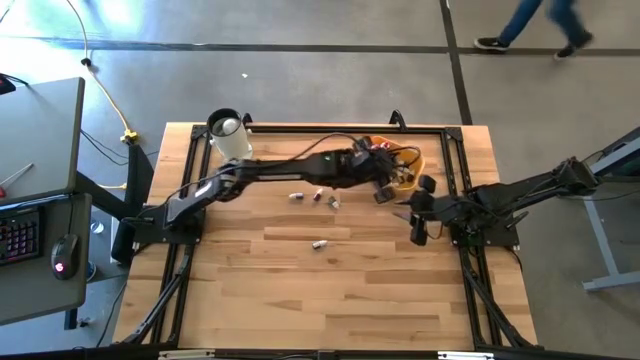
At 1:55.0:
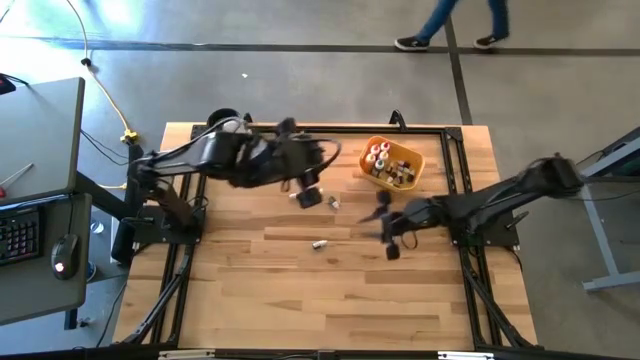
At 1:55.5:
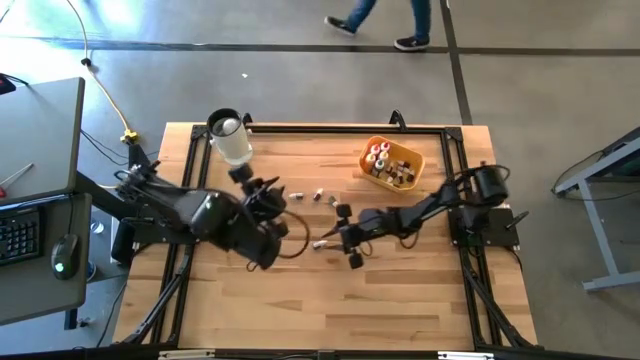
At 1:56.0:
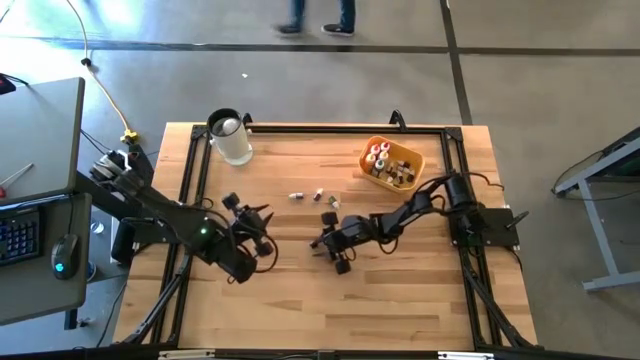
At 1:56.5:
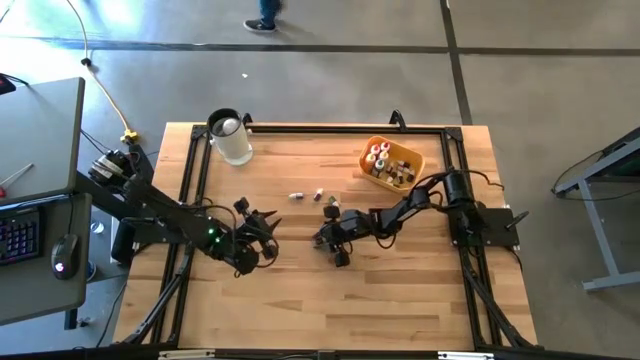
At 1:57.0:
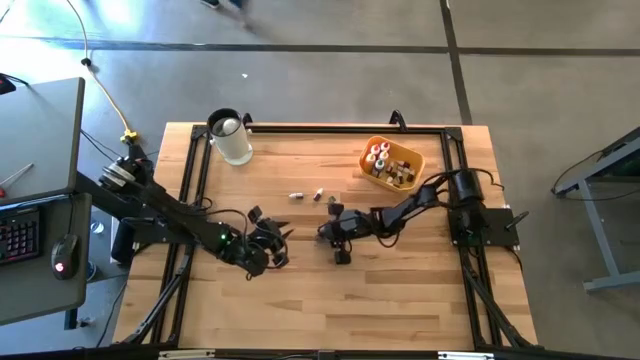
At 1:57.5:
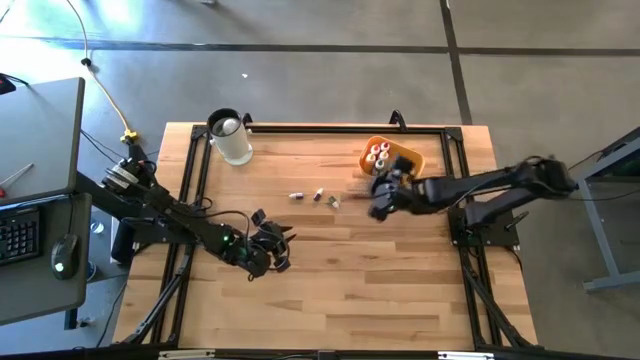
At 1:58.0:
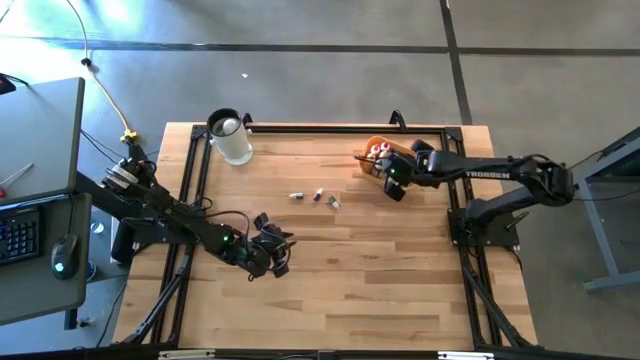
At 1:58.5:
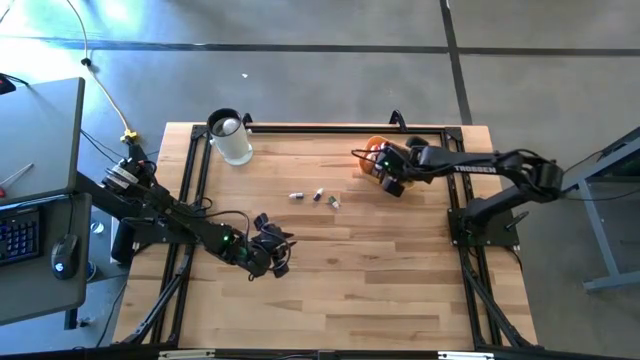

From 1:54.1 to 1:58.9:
Task: Pick & Place food coloring
Put the bottom small green food coloring bottle into the yellow bin

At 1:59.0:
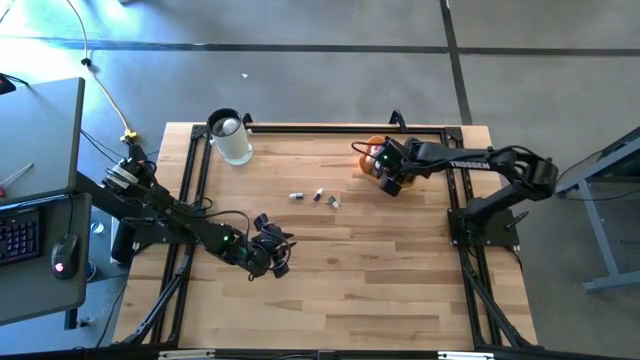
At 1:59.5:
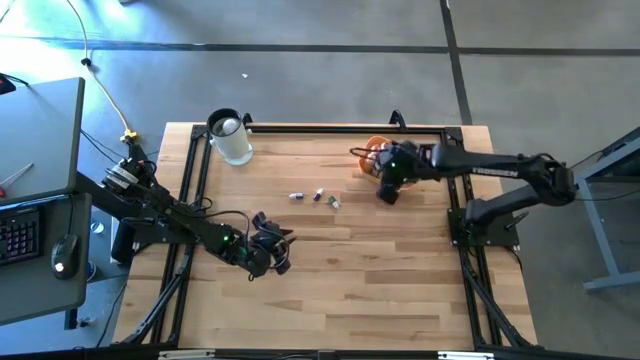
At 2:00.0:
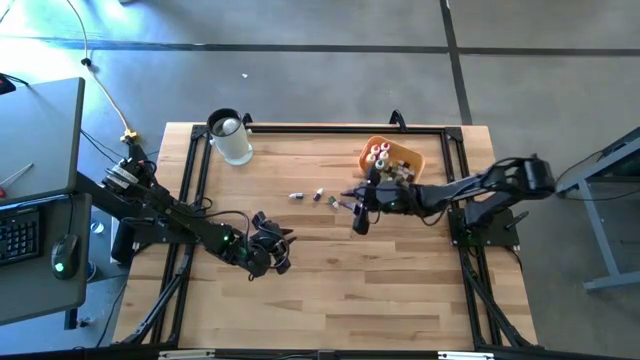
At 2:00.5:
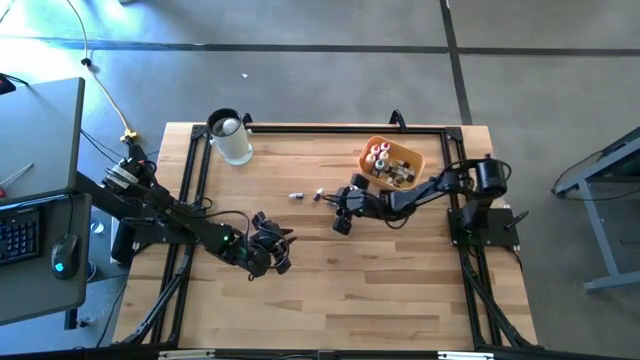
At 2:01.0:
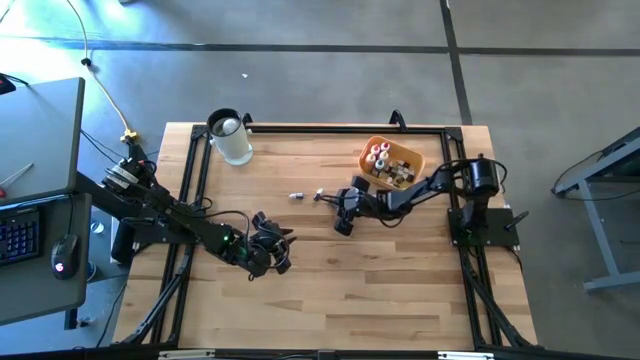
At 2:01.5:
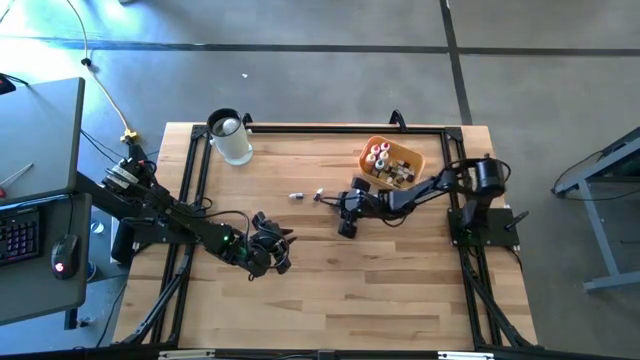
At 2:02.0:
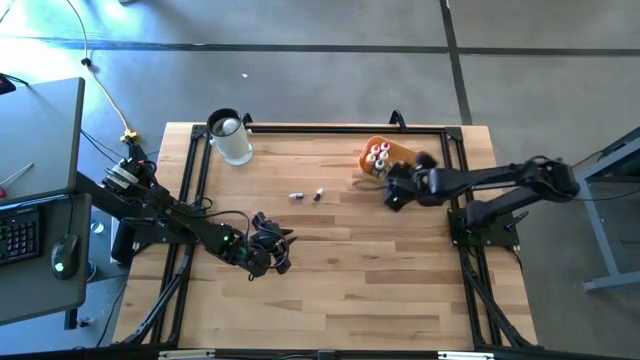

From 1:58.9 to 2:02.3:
Put the small green food coloring bottle into the yellow bin

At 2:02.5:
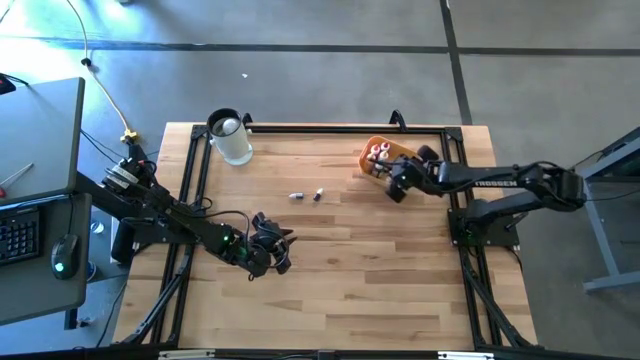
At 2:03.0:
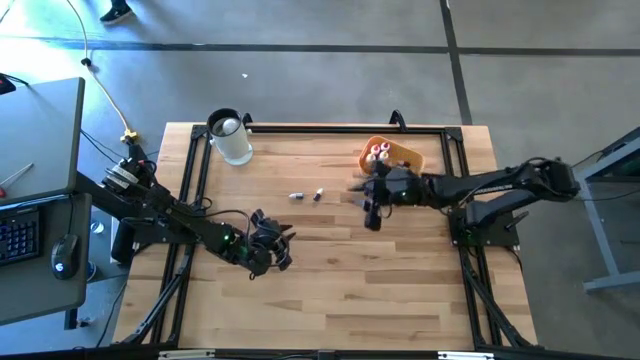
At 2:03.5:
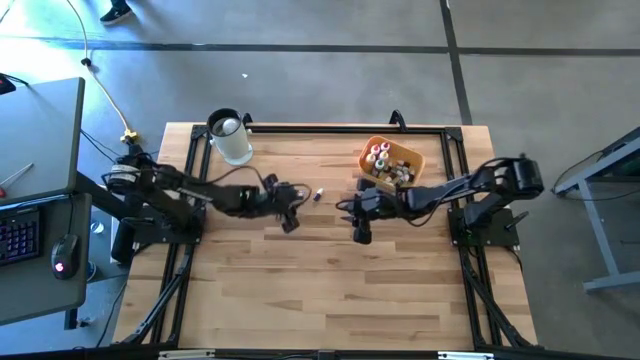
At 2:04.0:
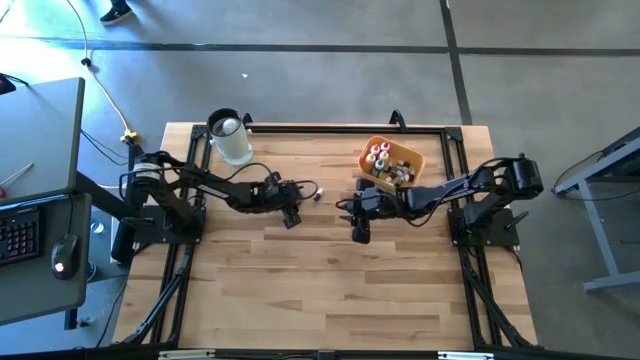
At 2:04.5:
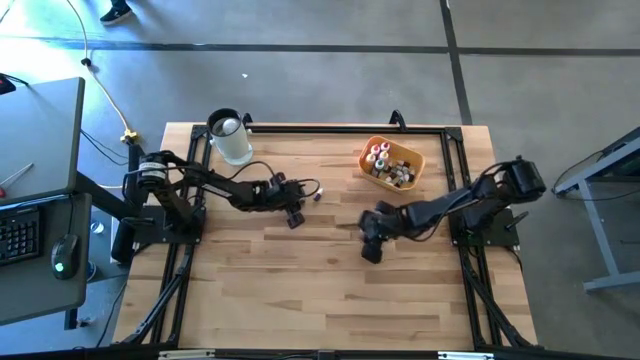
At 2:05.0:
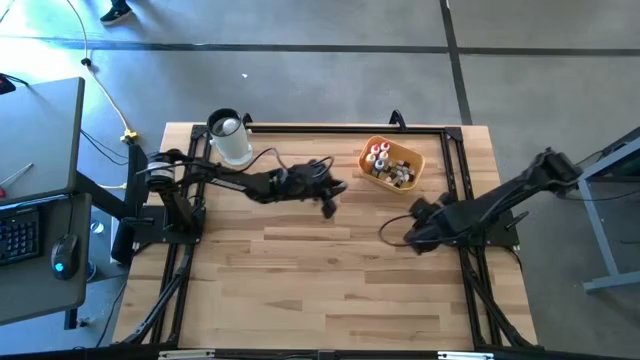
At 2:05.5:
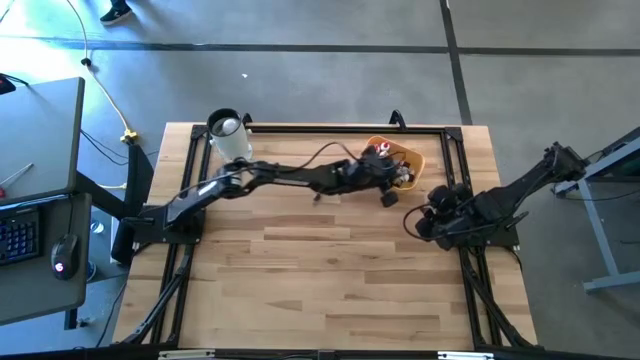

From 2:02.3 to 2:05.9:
Put the small purple food coloring bottle into the yellow bin

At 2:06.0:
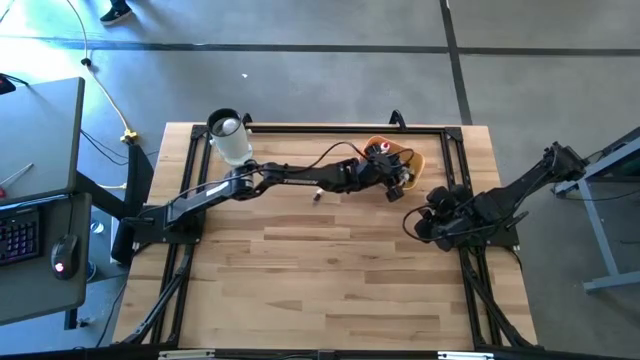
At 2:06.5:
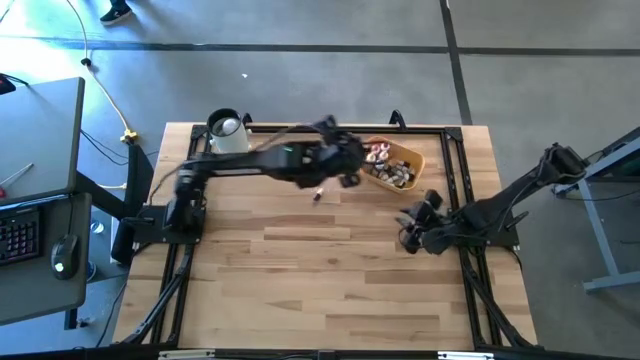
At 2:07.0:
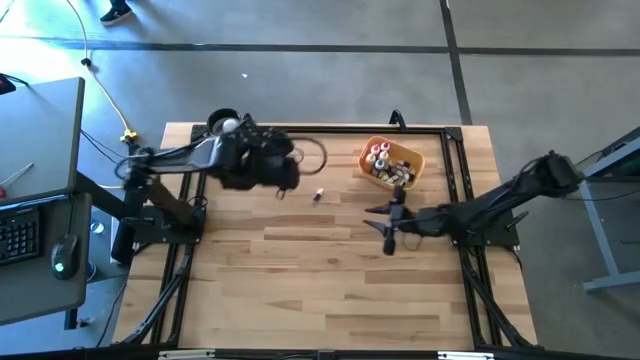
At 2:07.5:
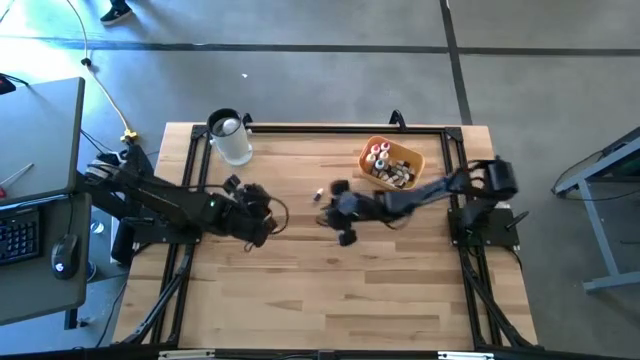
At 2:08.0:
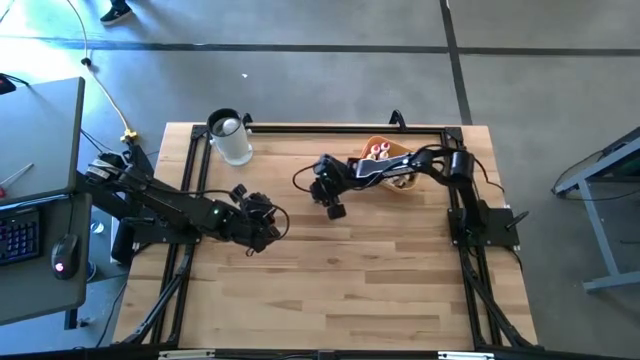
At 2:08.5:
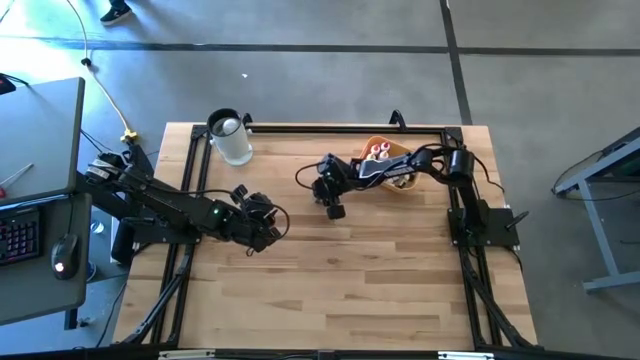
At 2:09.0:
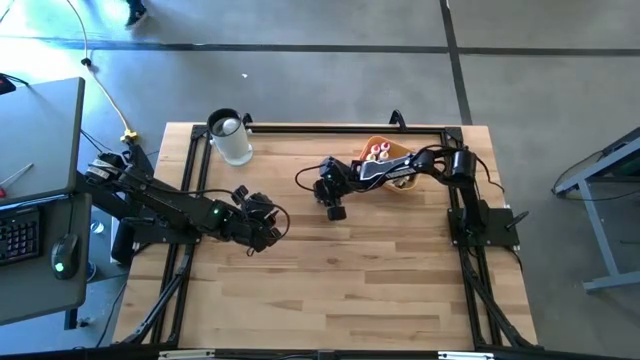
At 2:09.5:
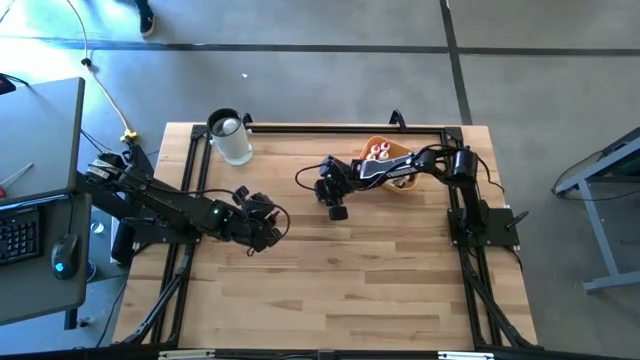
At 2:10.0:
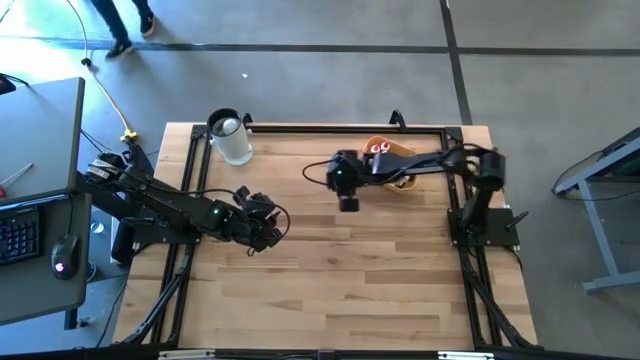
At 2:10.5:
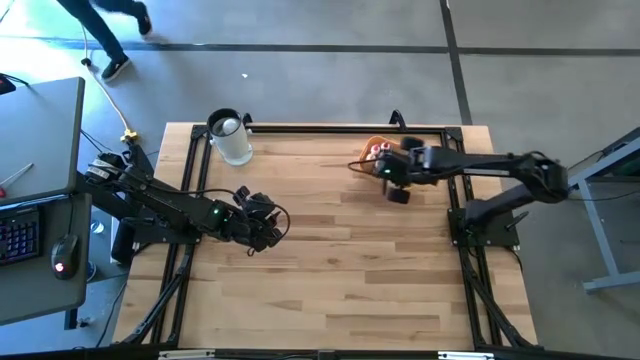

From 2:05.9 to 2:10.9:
Put the small red food coloring bottle into the yellow bin

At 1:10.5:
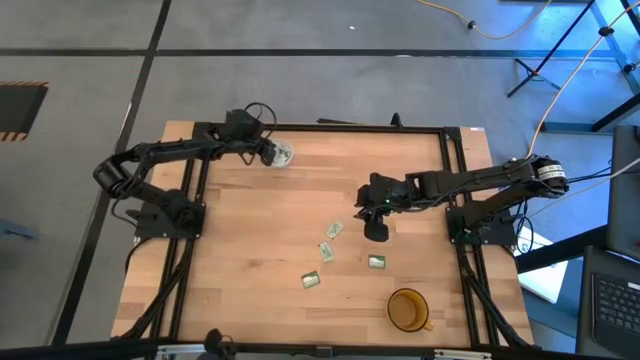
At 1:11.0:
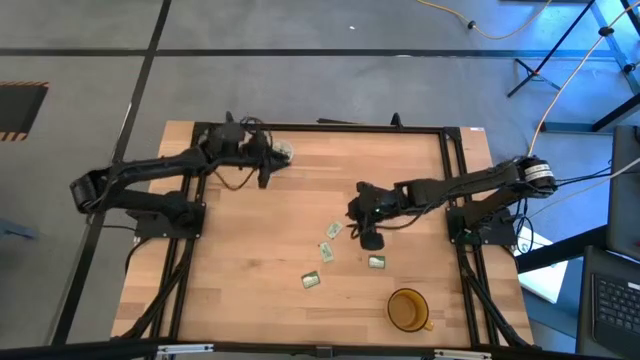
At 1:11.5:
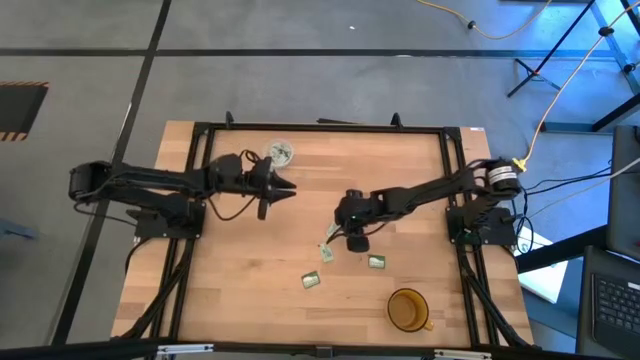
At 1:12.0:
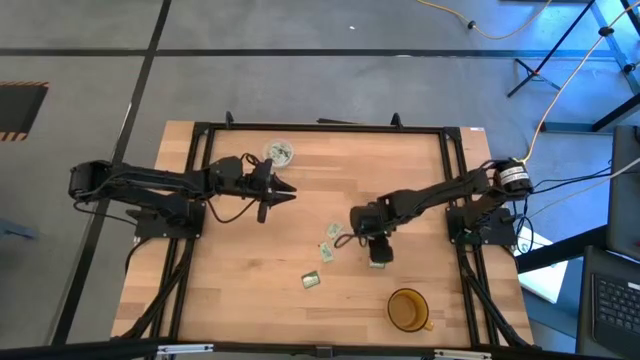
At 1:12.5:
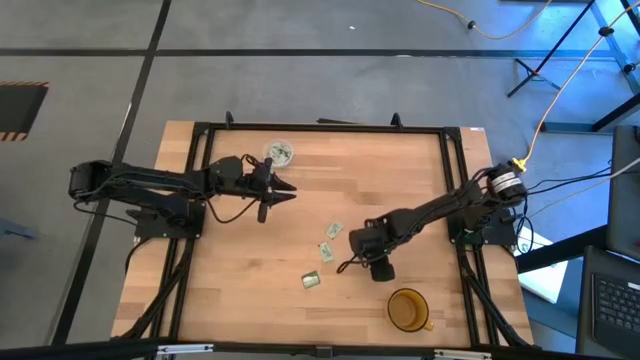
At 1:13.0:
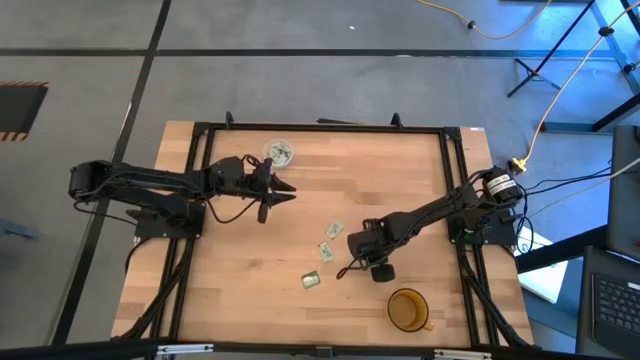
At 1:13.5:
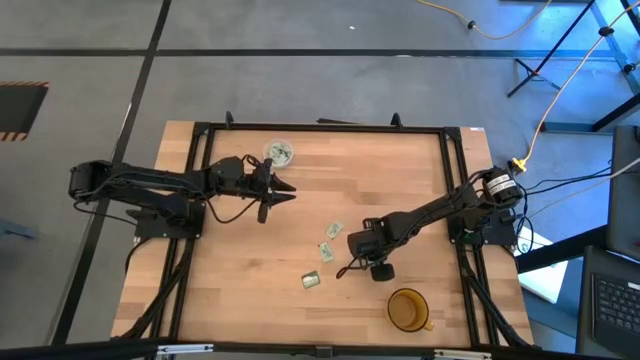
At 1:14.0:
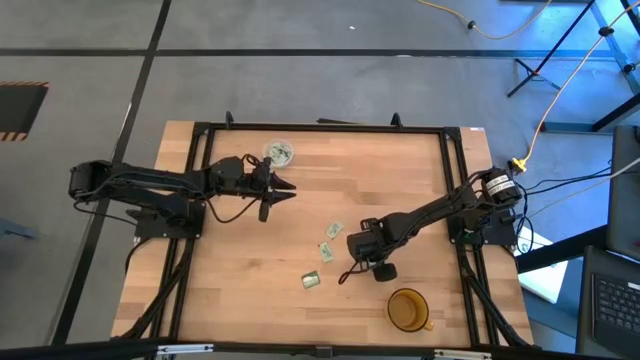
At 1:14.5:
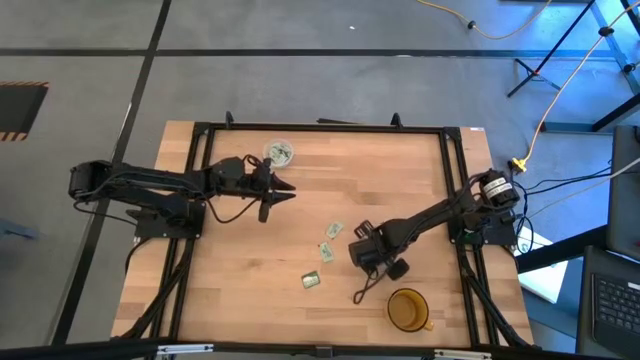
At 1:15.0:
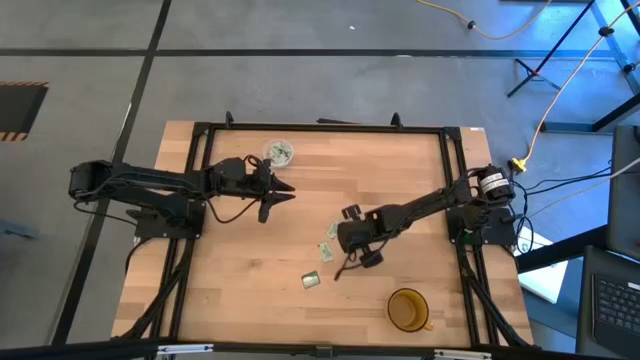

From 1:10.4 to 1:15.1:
Task: Pick and place Stevia / Truvia into bins
Put the truvia packet into the transparent container
